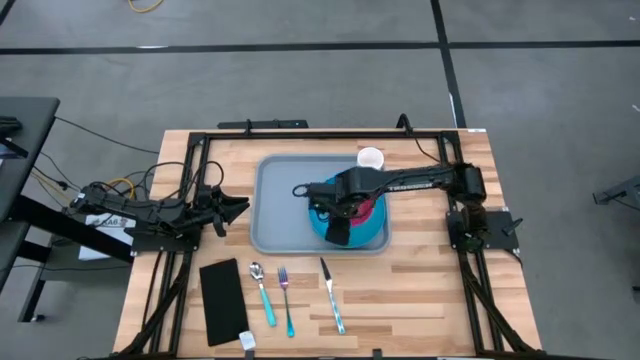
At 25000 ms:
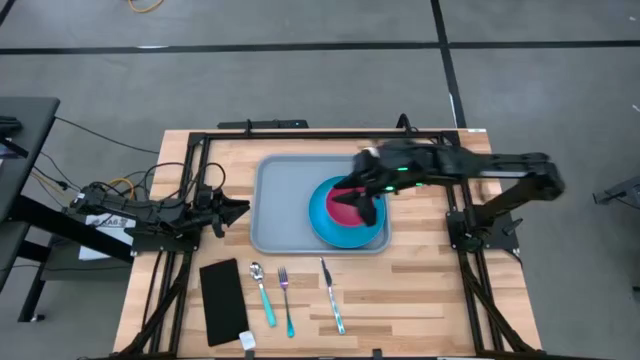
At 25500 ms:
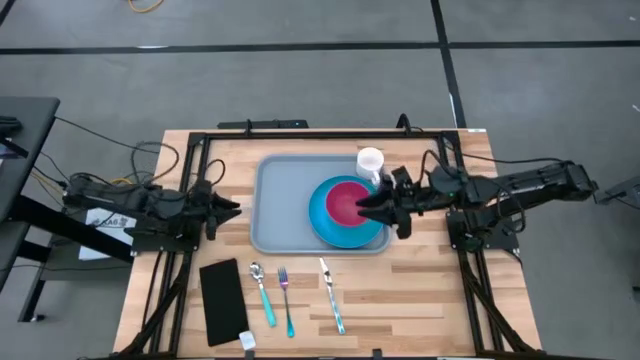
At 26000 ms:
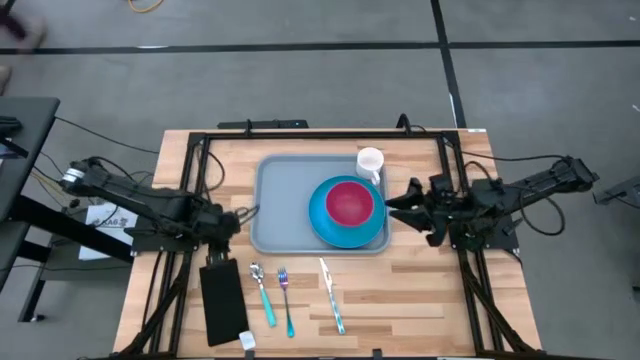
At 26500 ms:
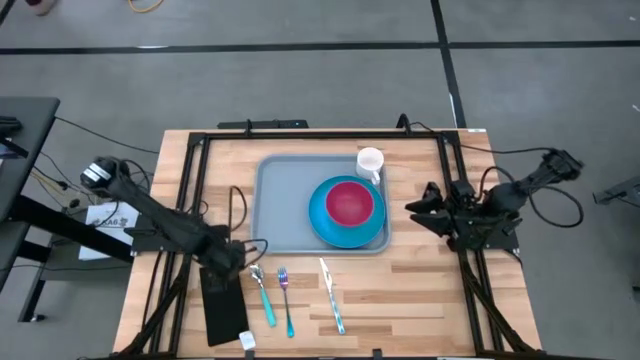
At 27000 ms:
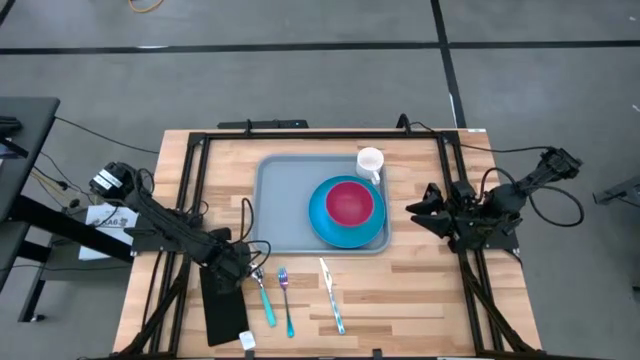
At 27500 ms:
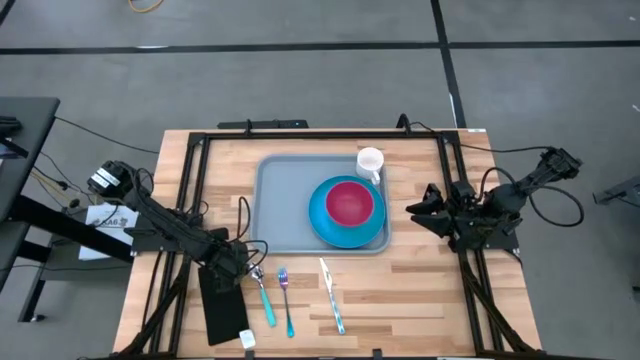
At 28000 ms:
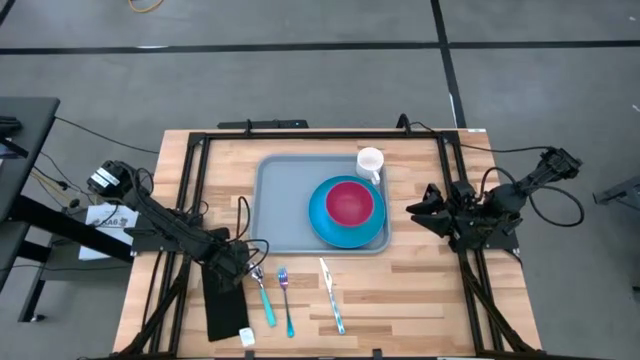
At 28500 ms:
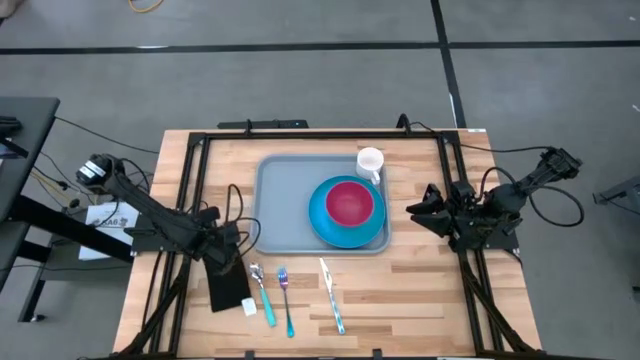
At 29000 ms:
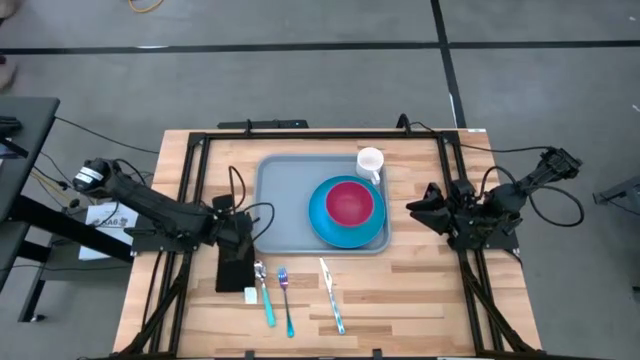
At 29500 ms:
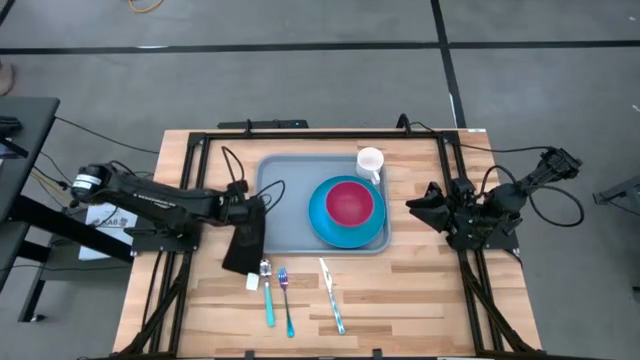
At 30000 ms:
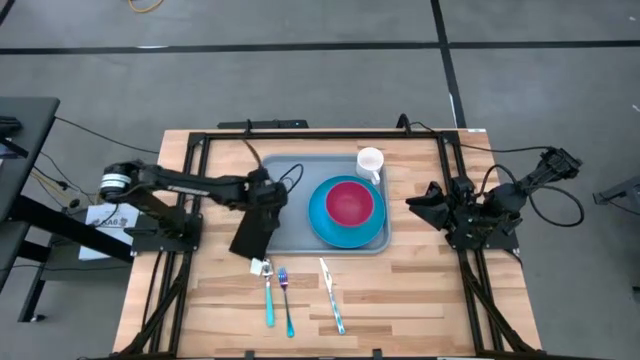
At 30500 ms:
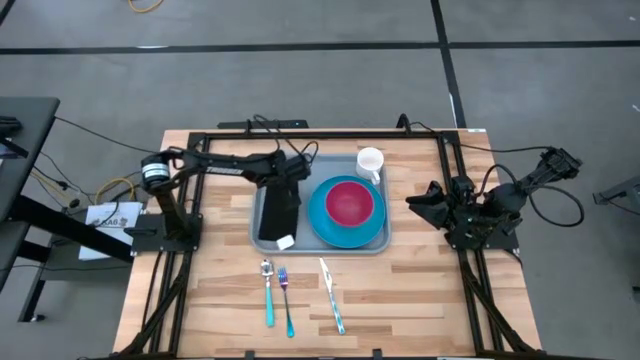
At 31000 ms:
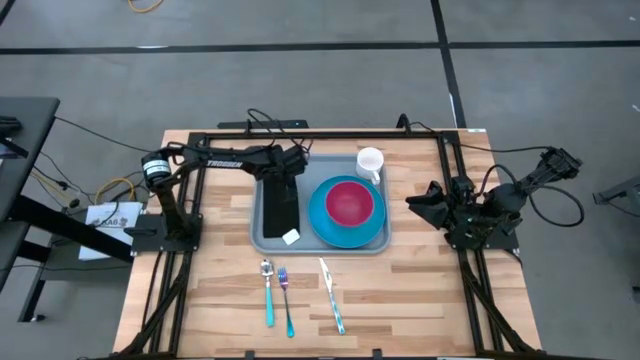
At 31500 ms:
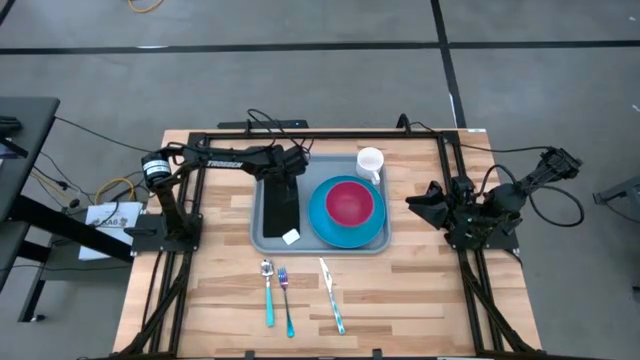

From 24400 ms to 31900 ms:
Task: Set up tray
Put the black napkin on the gray serving tray to the left side of the blue plate

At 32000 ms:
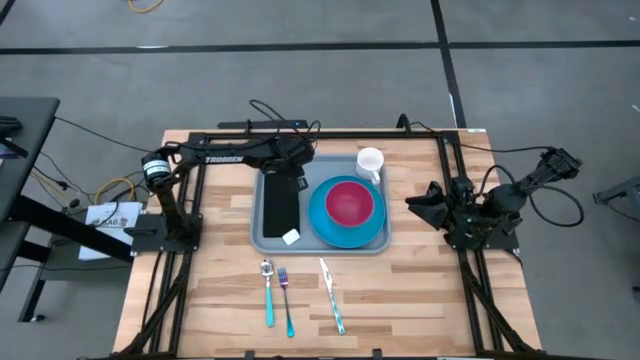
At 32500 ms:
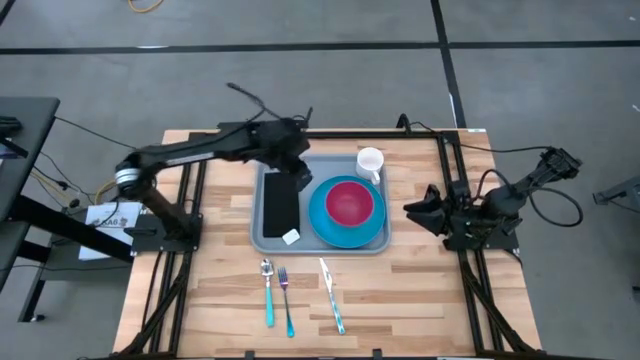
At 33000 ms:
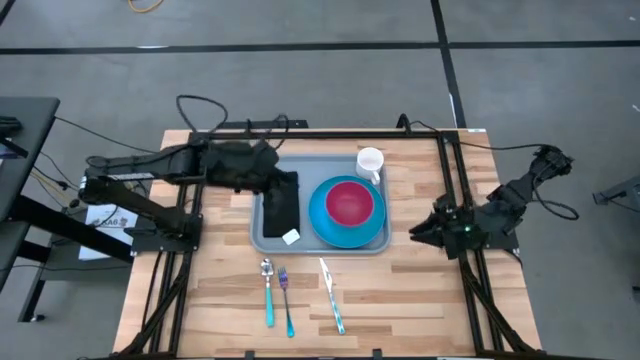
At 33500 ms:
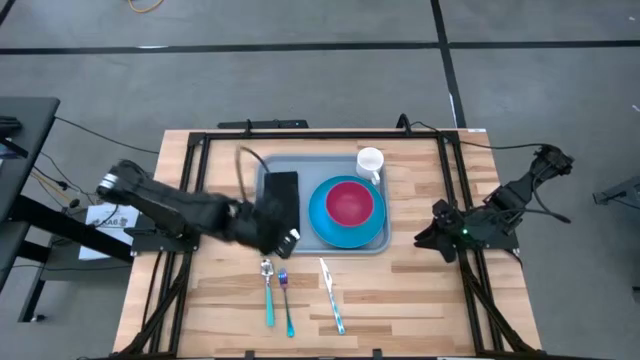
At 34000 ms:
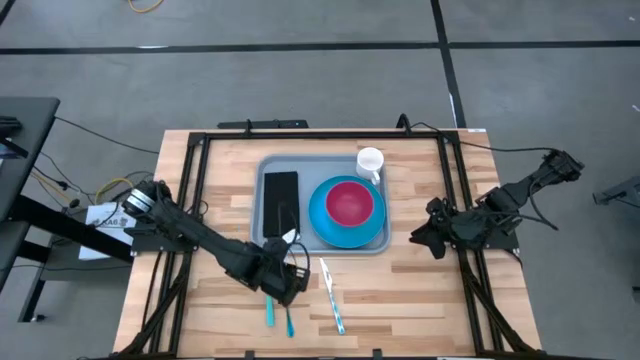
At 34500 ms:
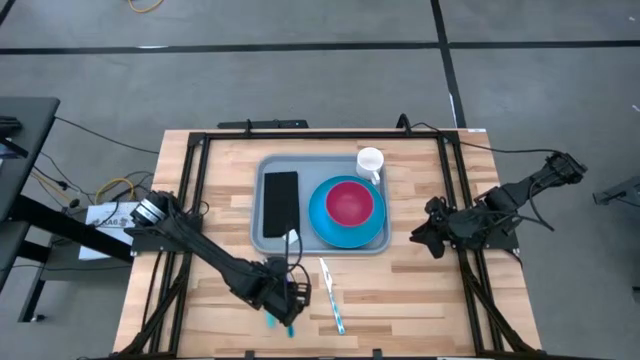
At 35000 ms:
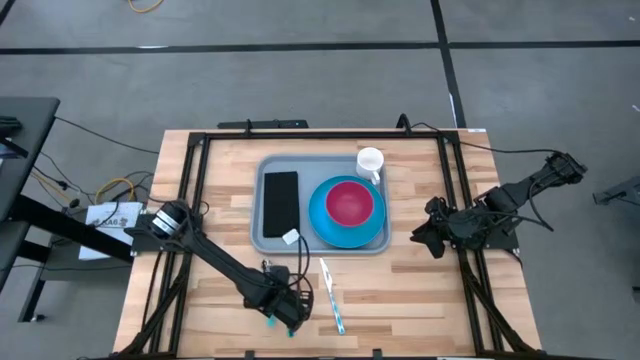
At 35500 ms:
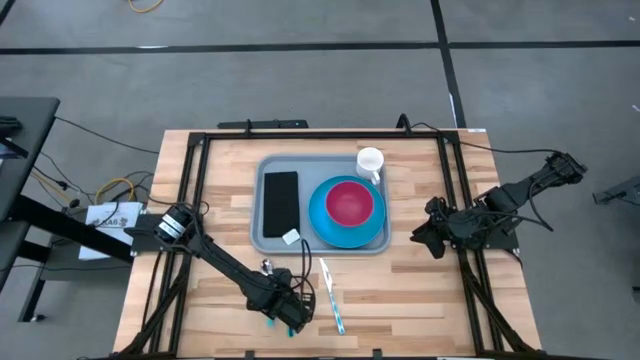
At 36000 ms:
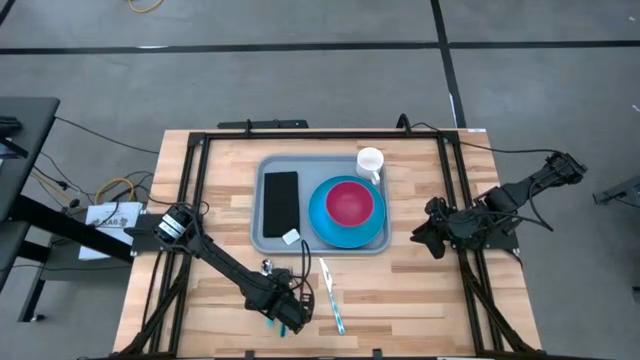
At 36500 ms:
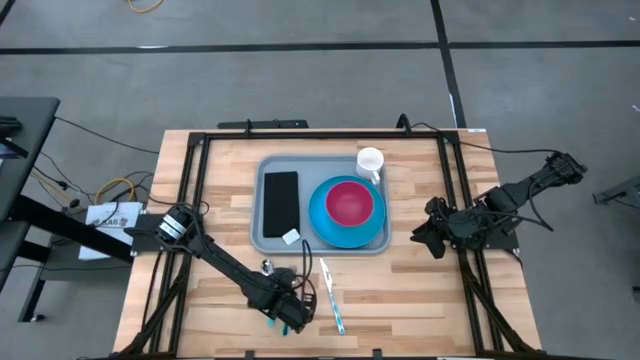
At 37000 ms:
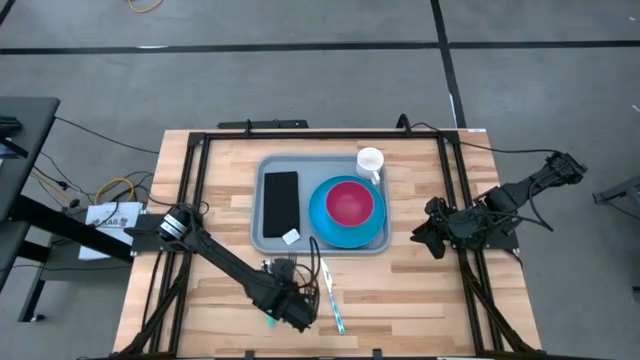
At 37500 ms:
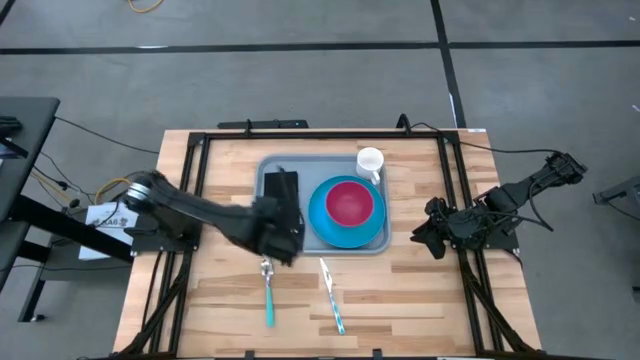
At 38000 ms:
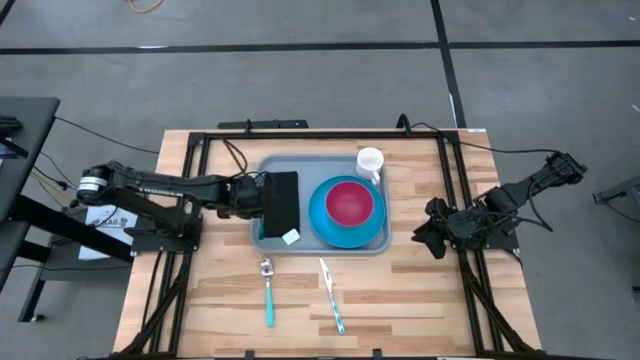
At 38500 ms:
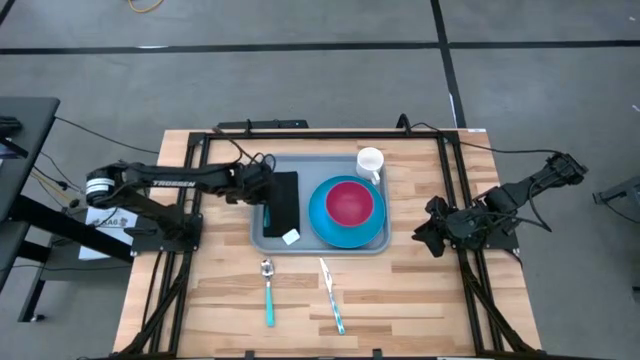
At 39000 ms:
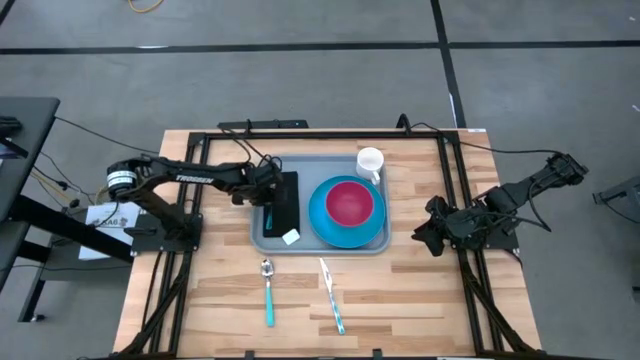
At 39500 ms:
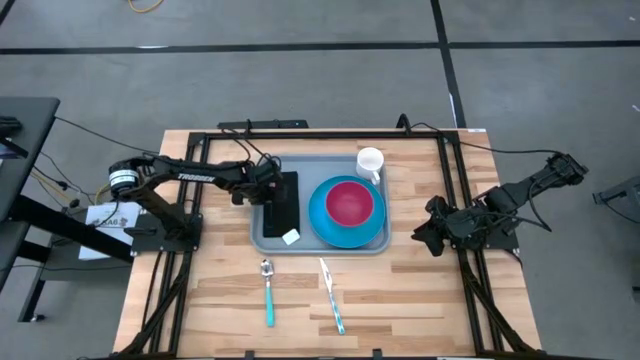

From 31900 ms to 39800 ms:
Put the blue fork on the black napkin

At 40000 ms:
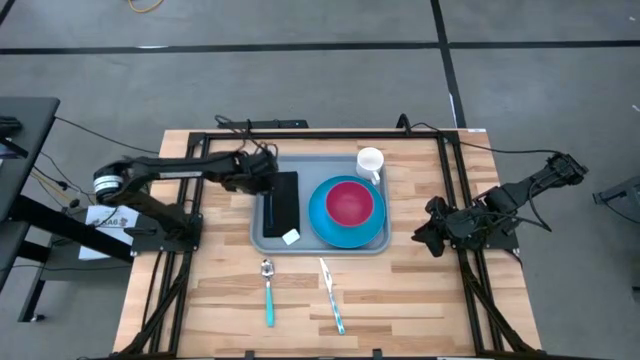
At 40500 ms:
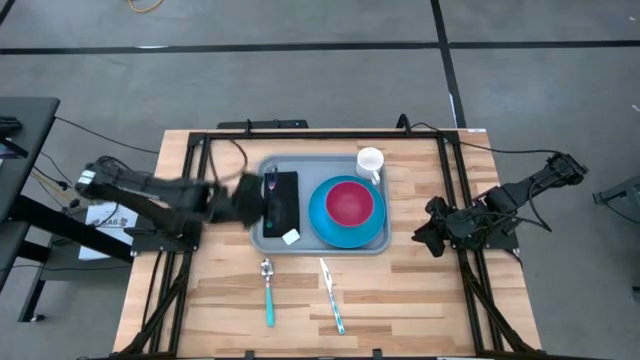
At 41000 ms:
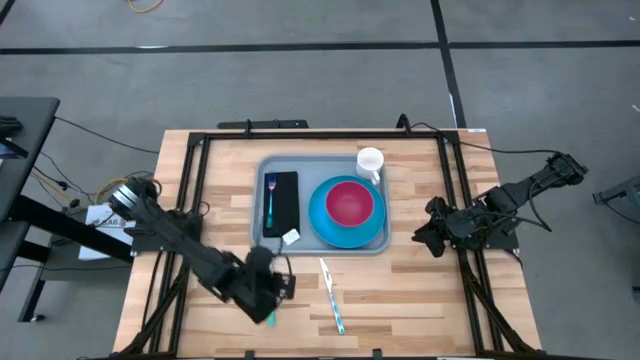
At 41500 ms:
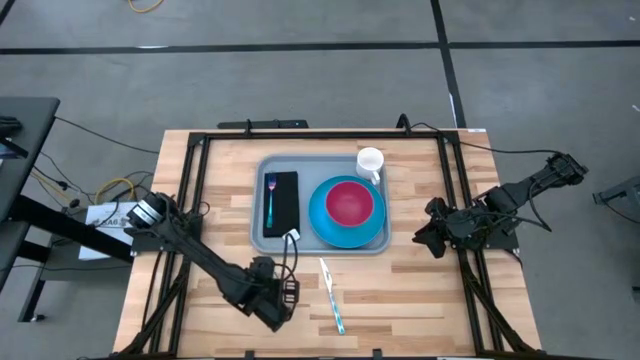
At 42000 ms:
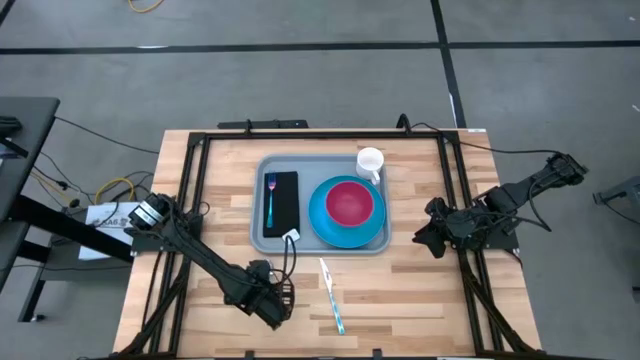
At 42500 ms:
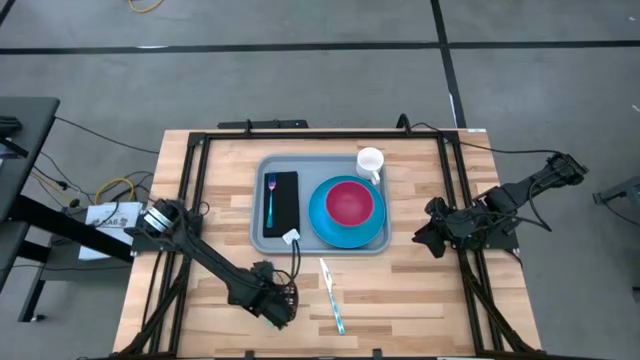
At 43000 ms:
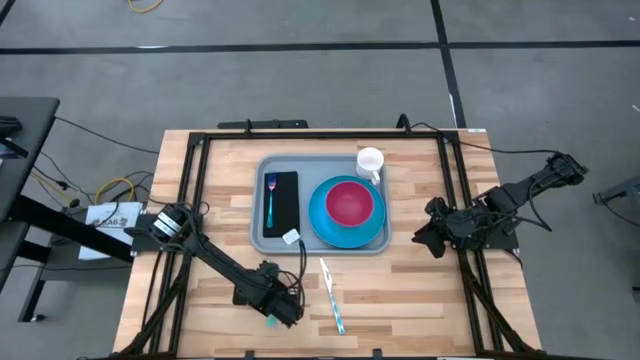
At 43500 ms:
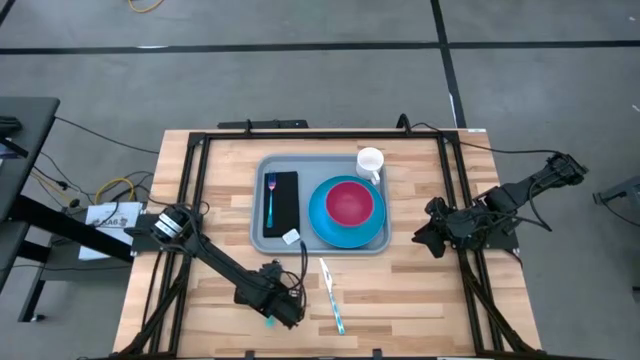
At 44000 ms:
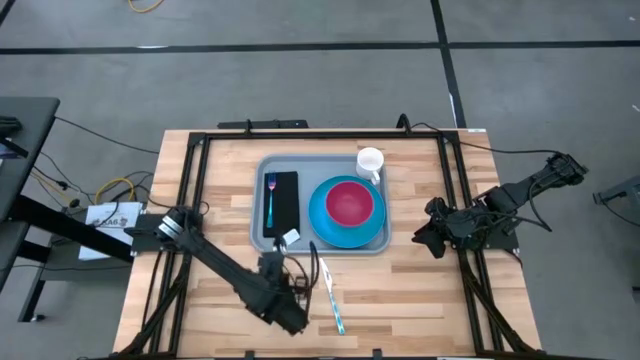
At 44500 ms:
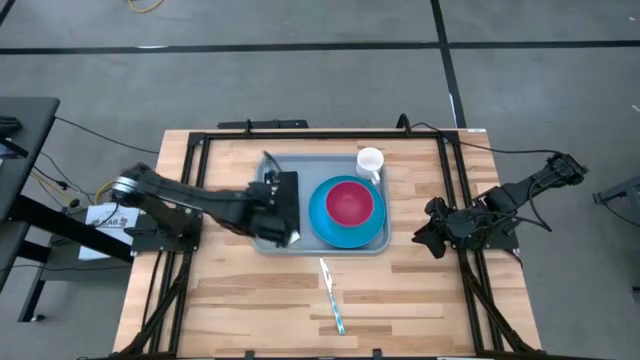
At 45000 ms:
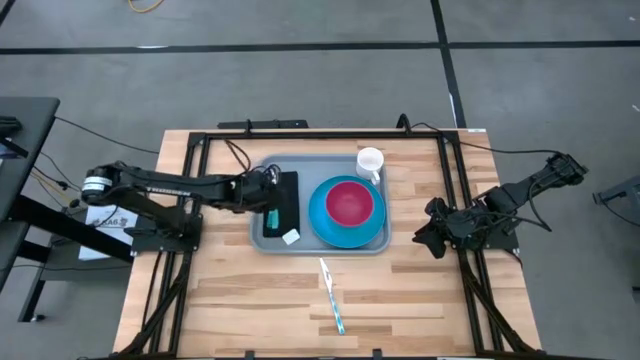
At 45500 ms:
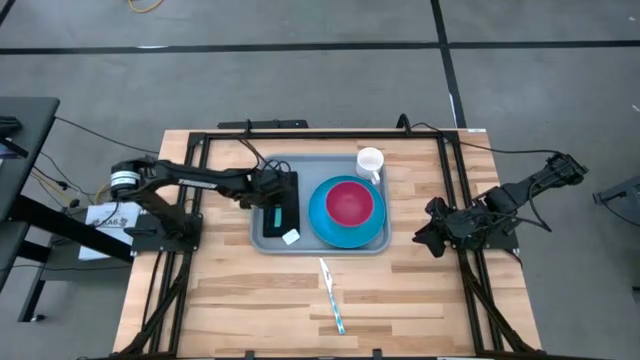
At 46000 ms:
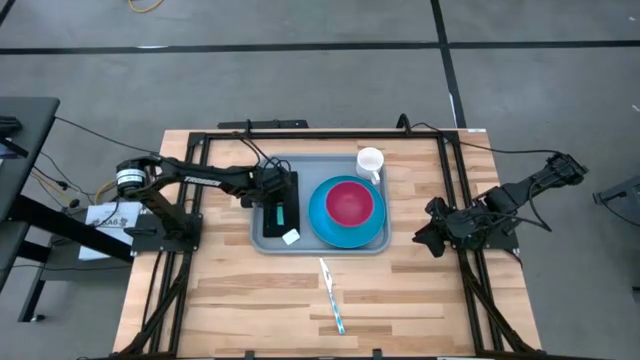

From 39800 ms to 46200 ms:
Put the light blue spoon on the black napkin to the right side of the light blue fork
